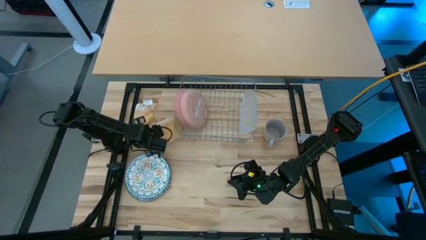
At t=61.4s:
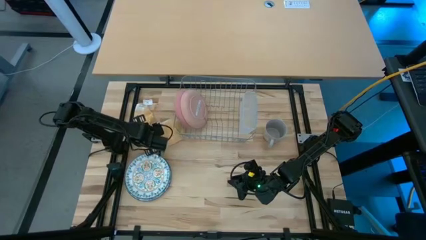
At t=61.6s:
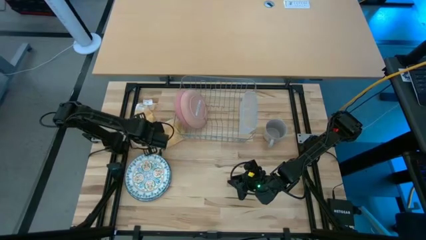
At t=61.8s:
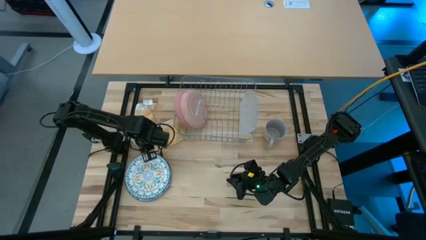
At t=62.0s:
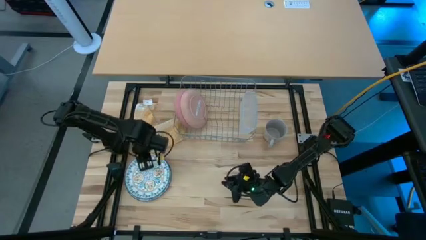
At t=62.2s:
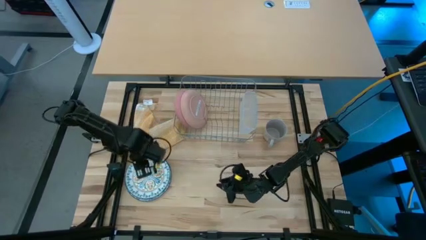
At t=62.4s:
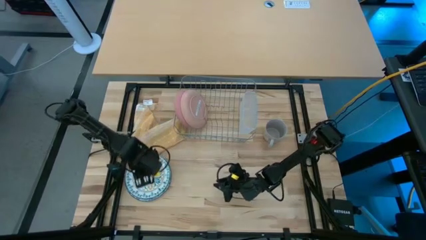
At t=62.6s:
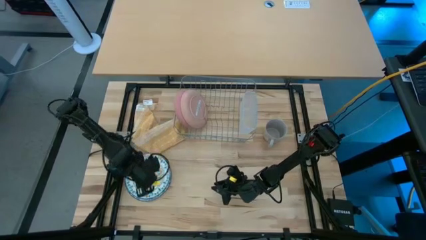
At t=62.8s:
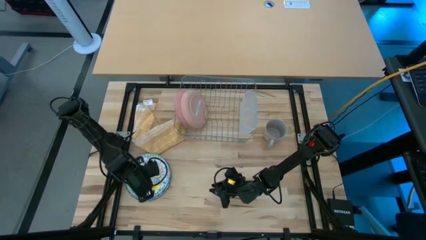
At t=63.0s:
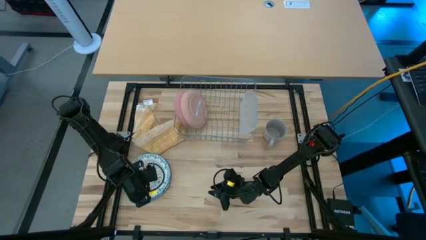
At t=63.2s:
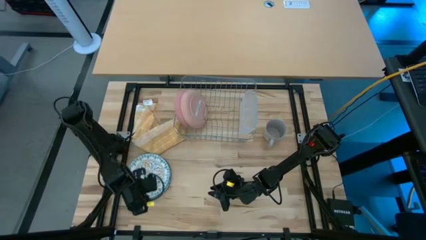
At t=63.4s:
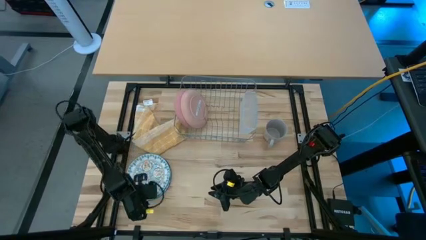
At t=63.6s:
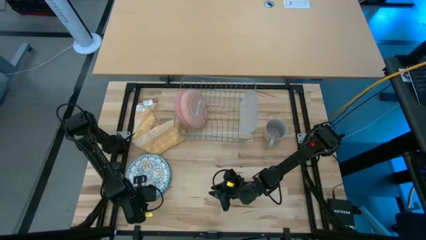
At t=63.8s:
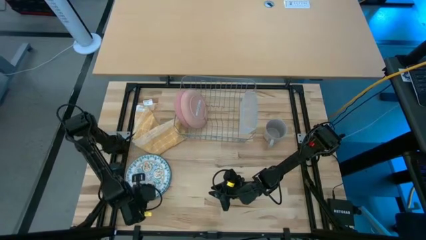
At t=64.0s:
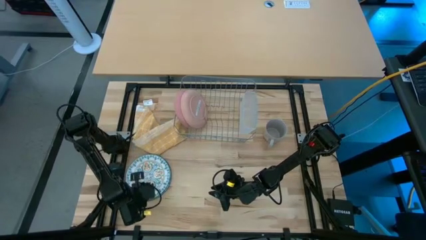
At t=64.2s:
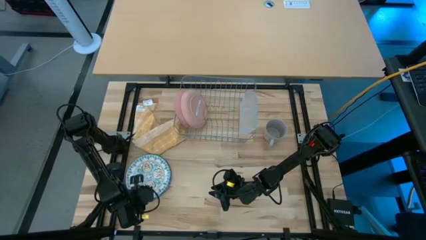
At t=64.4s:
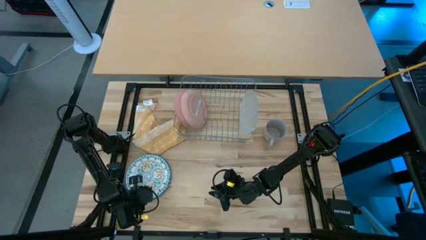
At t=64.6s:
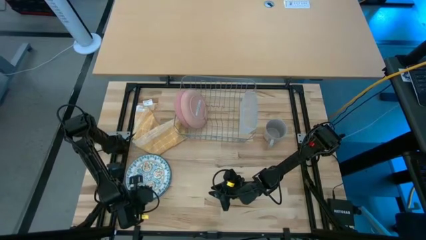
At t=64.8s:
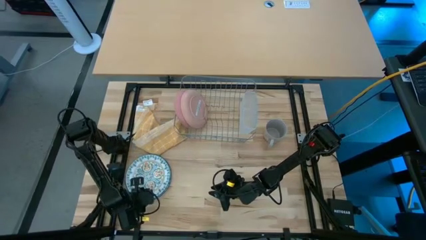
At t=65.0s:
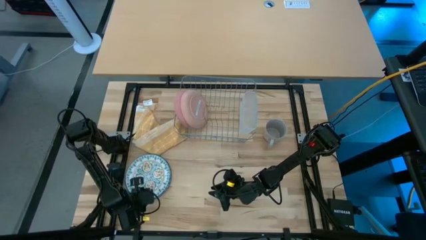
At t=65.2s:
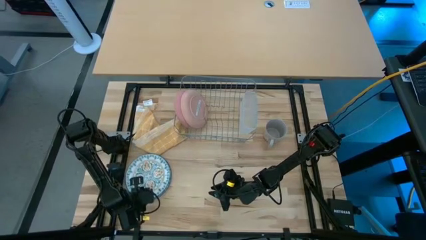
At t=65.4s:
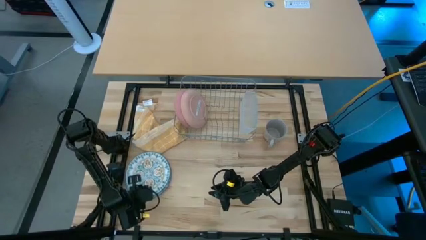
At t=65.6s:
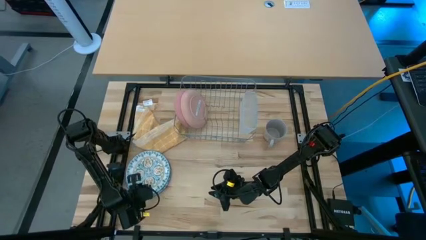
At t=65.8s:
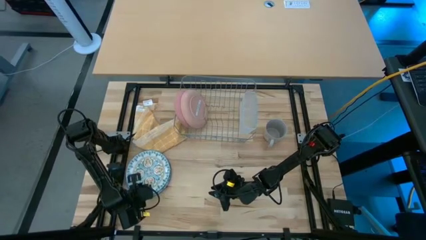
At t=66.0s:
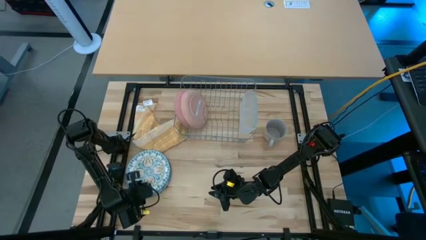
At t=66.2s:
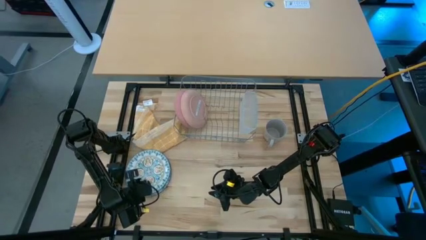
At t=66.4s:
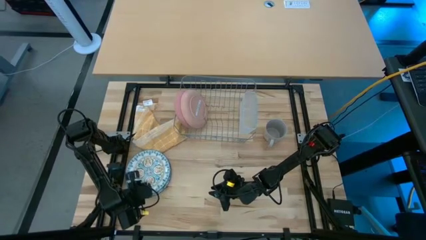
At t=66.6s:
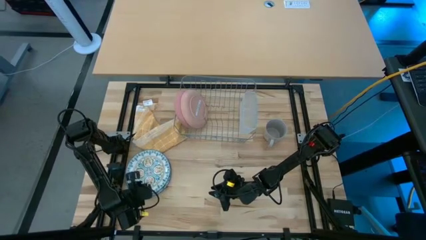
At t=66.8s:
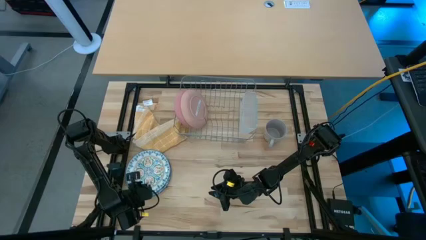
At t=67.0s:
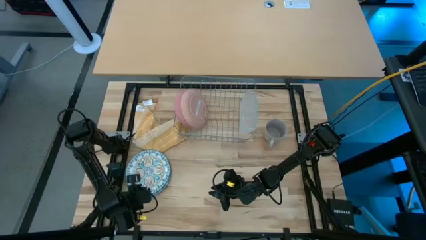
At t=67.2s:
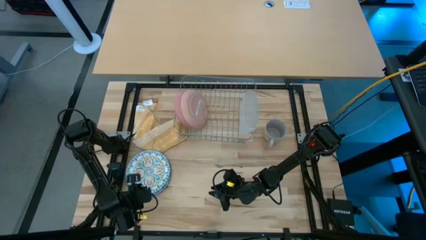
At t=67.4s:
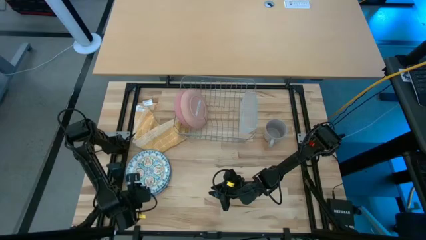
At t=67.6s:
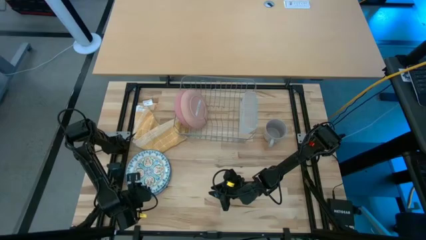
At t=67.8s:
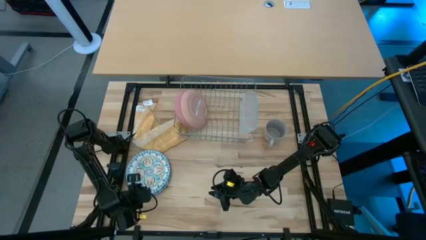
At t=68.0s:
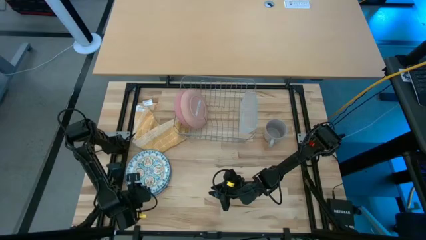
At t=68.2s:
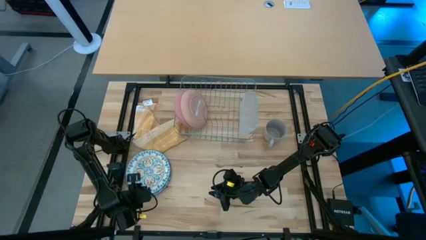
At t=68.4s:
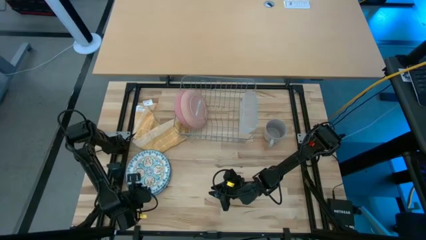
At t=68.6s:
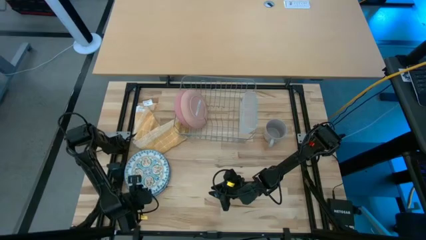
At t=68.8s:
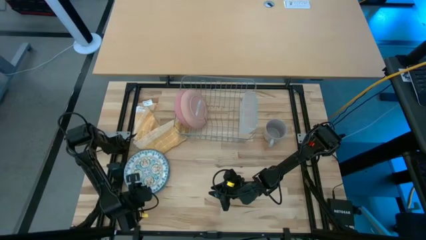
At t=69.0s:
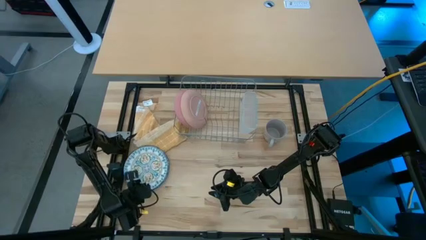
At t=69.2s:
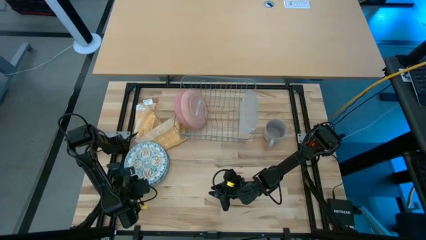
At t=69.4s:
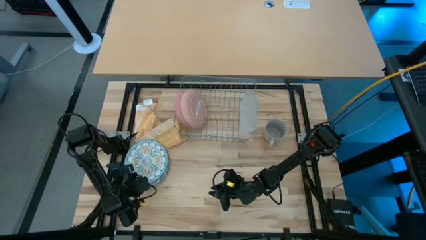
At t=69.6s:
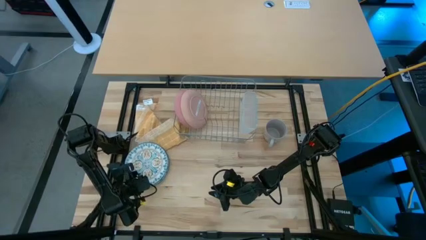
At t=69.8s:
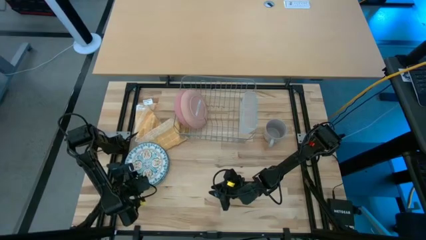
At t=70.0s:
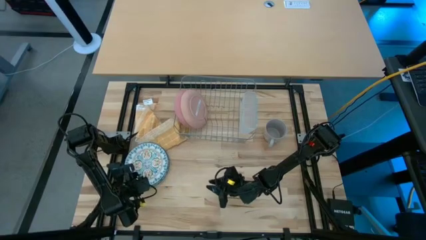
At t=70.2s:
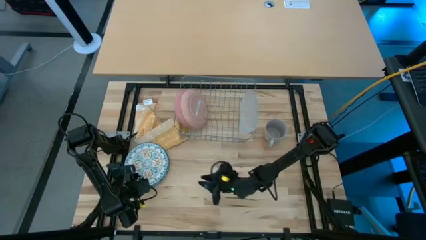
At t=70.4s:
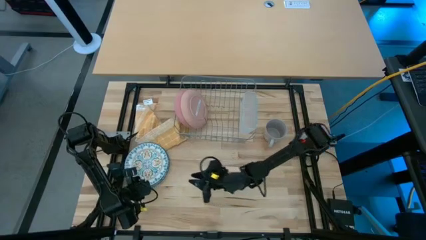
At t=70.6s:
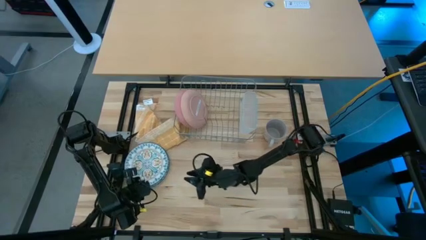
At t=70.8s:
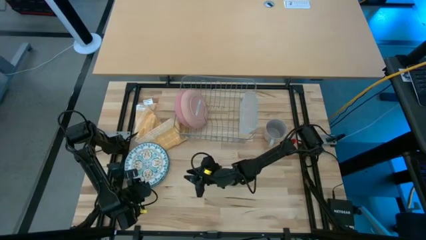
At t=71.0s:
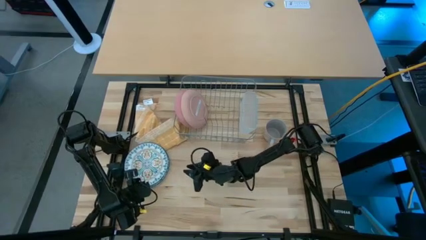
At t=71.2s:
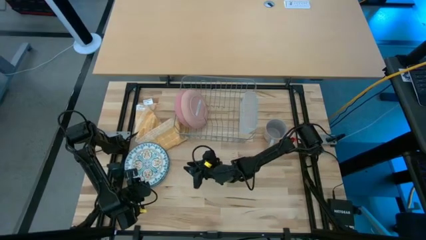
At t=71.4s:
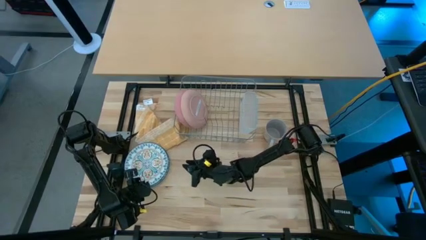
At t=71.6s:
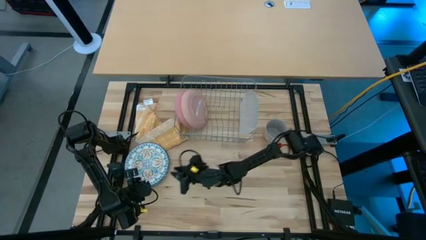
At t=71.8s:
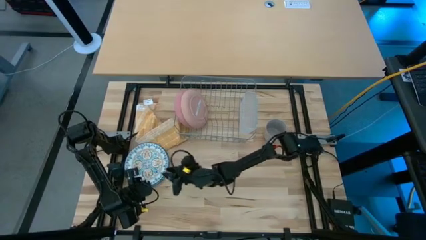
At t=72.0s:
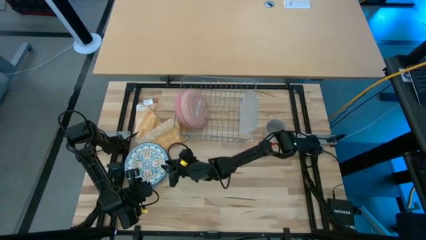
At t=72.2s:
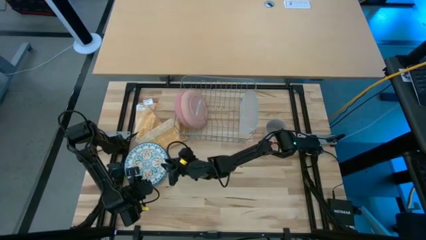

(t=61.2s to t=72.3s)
Task: Sort dishes
Put the white patterned plate in the dish rack

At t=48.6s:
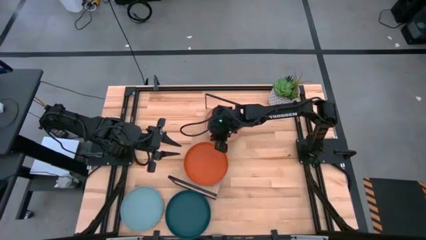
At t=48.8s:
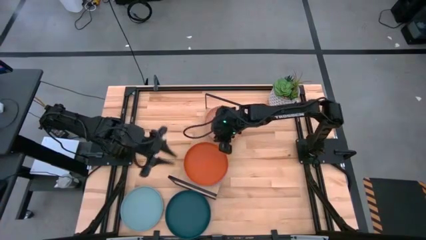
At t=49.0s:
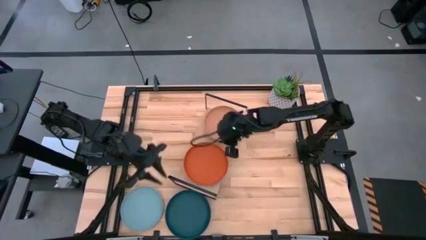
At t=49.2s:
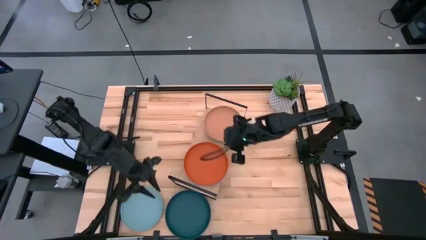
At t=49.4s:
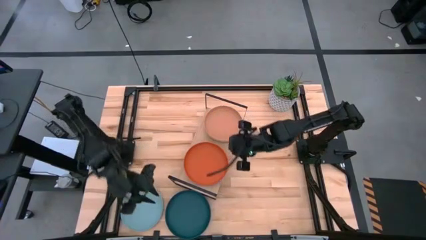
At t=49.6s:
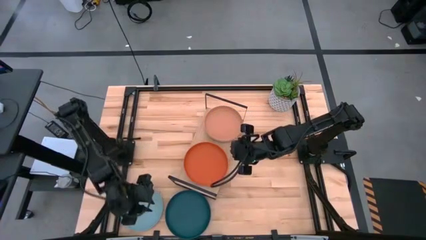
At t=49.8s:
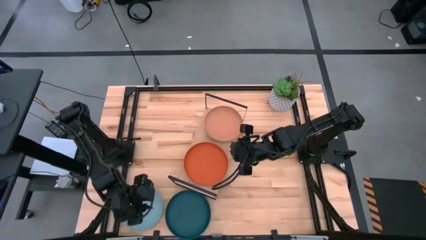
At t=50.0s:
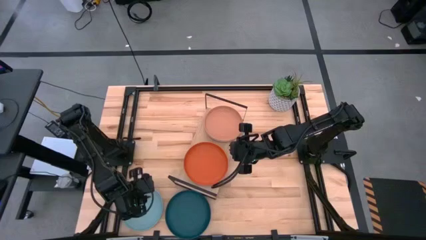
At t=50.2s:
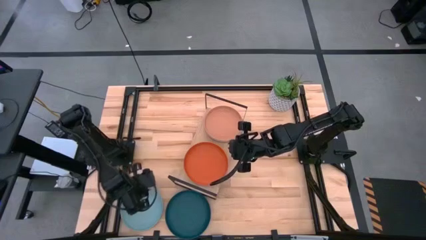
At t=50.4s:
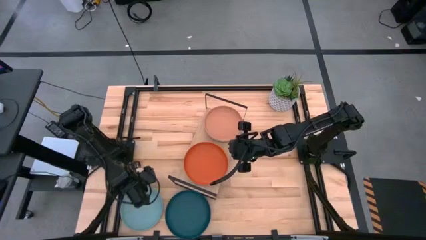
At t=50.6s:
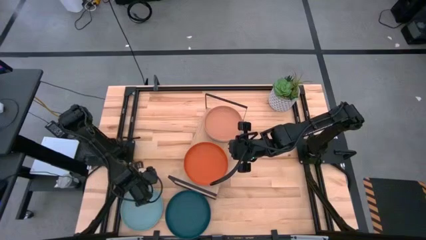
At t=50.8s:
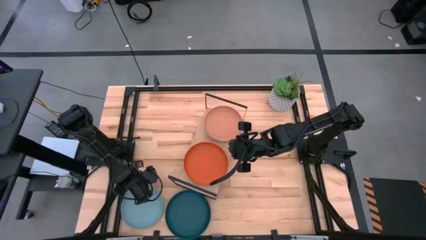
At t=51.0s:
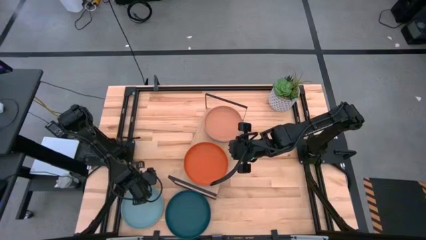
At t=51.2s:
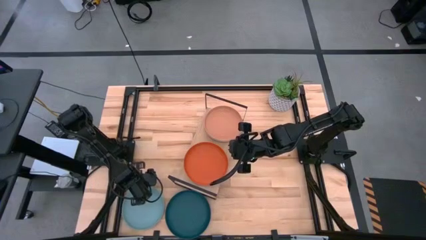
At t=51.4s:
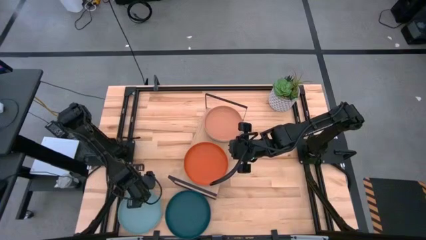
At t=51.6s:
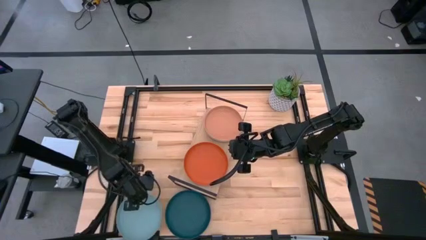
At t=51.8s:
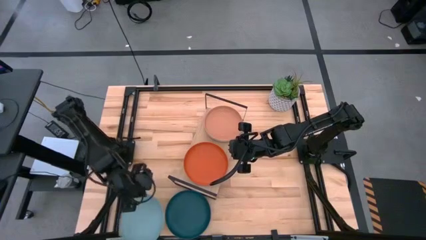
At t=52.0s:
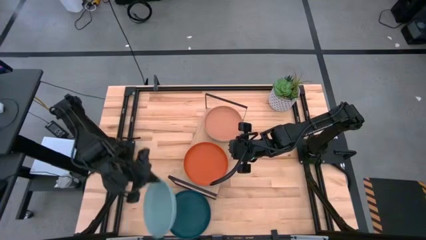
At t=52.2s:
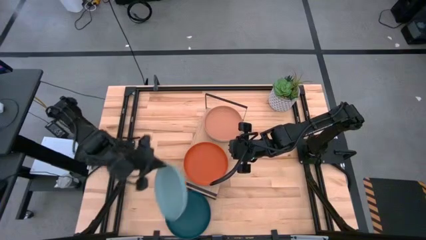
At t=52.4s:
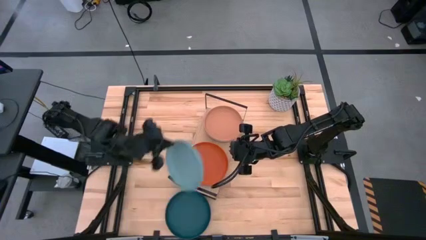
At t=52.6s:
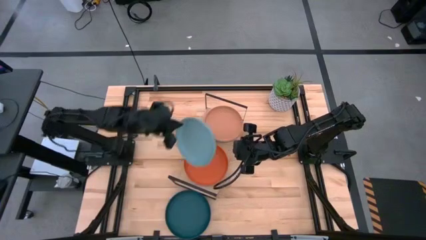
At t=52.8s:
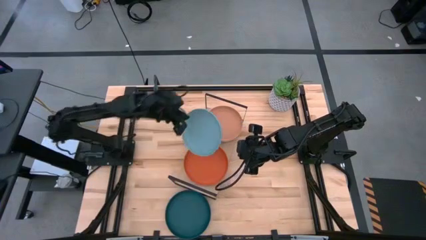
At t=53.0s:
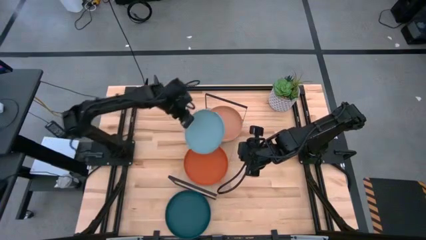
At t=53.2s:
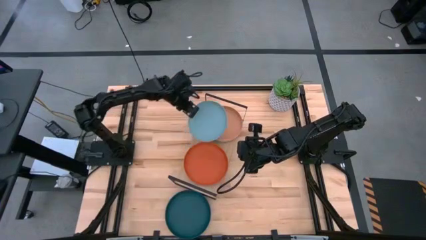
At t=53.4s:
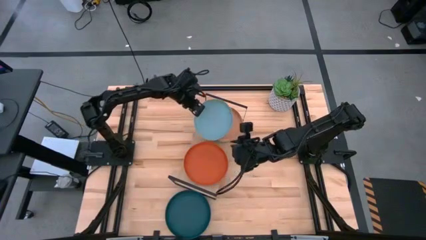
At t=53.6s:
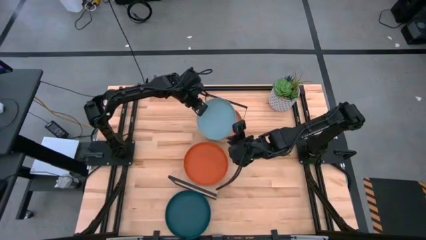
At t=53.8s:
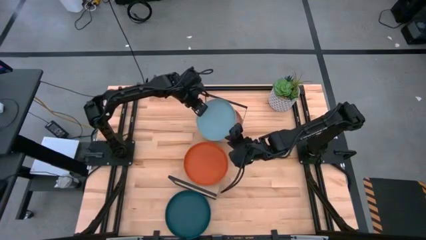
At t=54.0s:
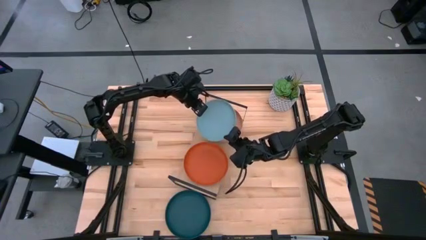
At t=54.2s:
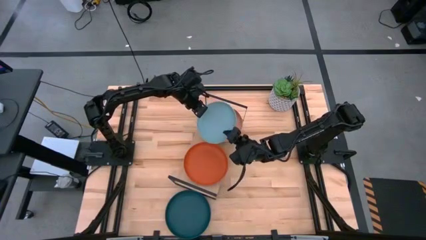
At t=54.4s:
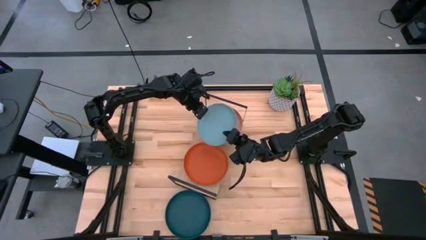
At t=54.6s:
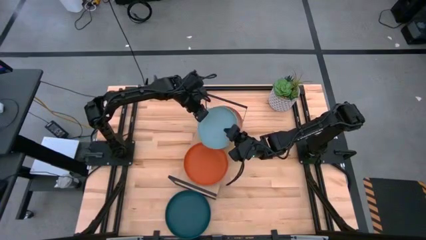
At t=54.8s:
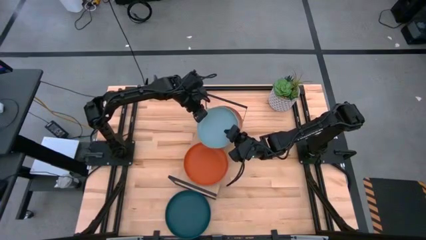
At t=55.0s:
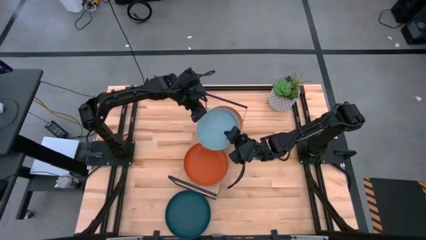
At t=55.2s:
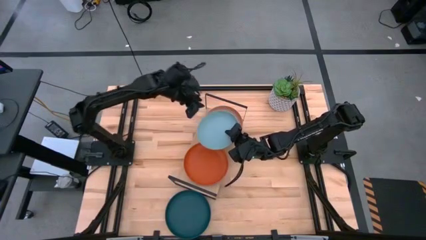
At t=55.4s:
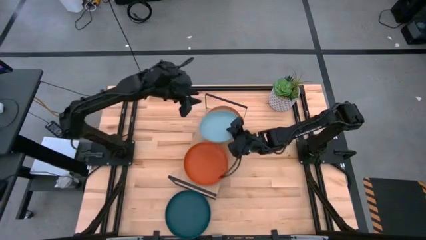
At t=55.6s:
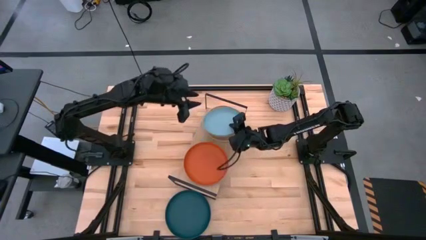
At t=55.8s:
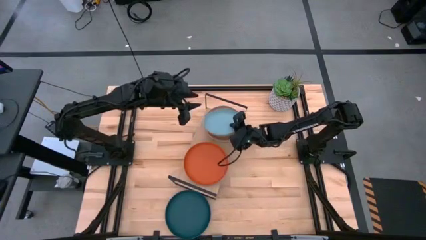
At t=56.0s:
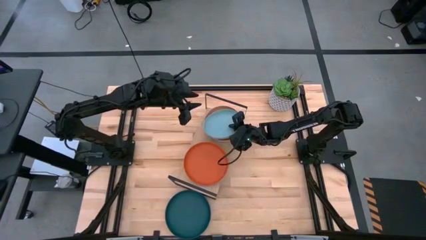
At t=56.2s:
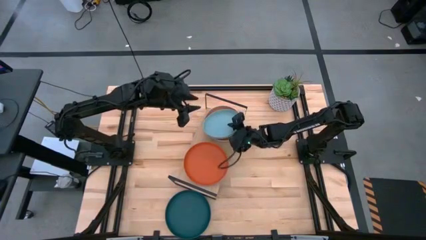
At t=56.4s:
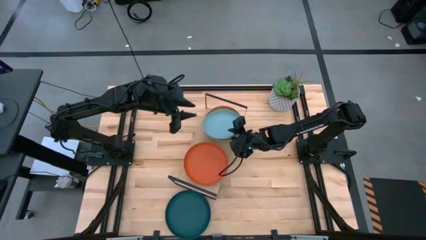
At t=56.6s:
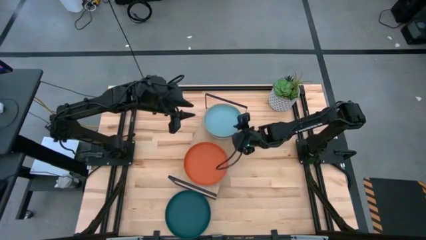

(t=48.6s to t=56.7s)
Task: Place and stack plates onto a shelf
Stack the light blue plate on top of the brown plate on the shelf
